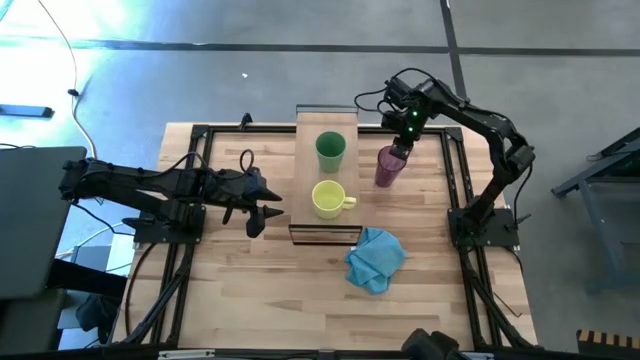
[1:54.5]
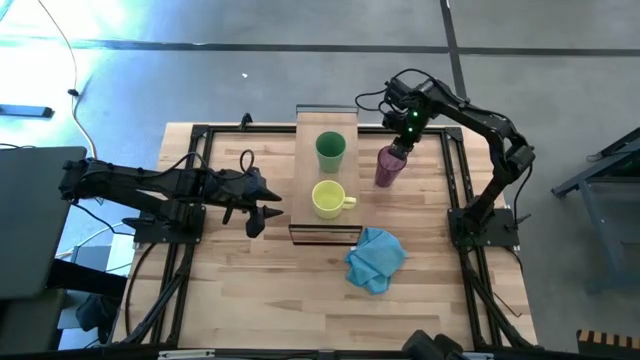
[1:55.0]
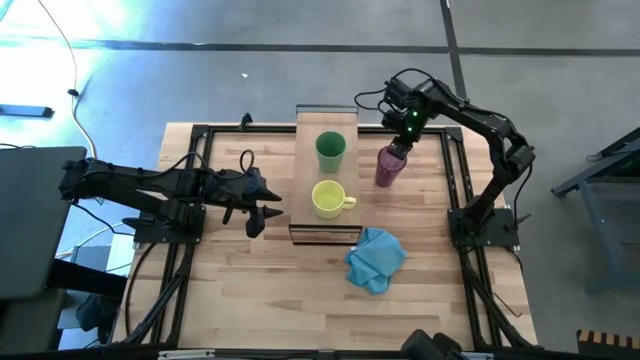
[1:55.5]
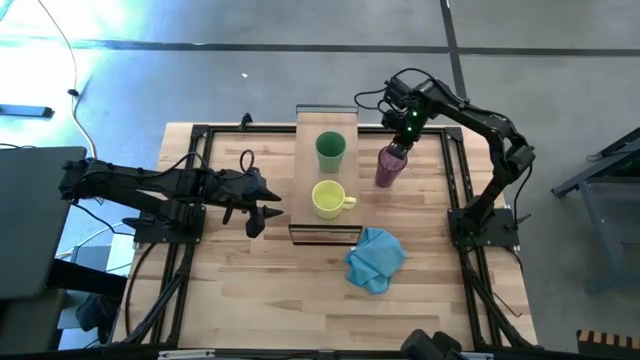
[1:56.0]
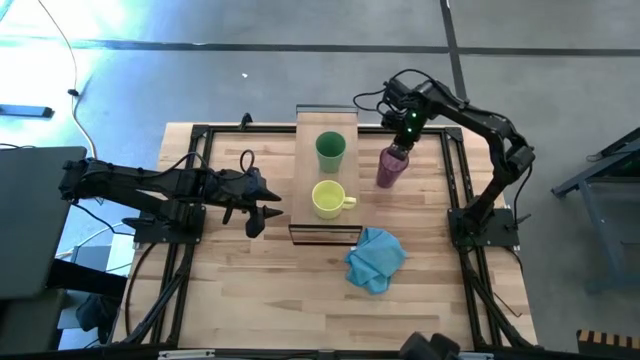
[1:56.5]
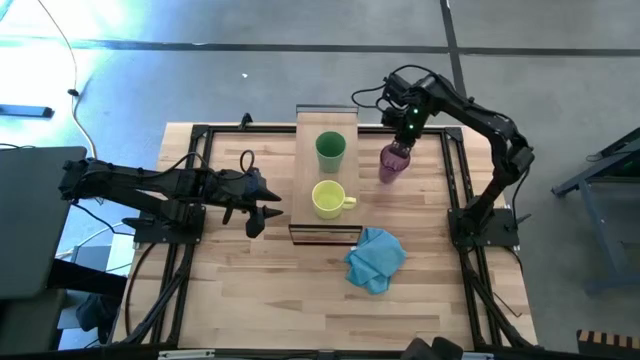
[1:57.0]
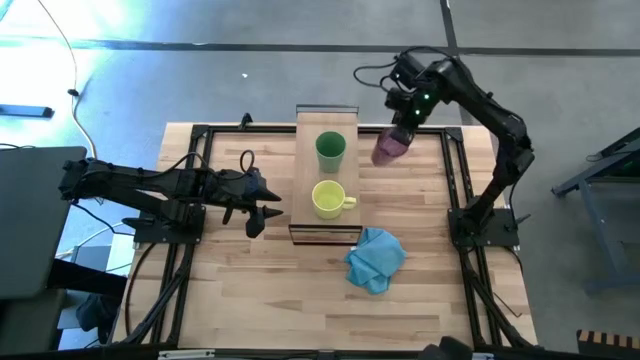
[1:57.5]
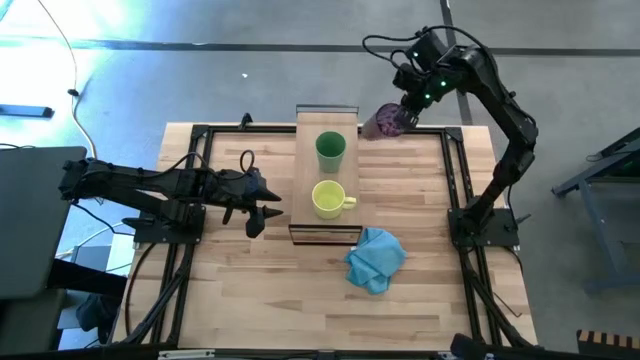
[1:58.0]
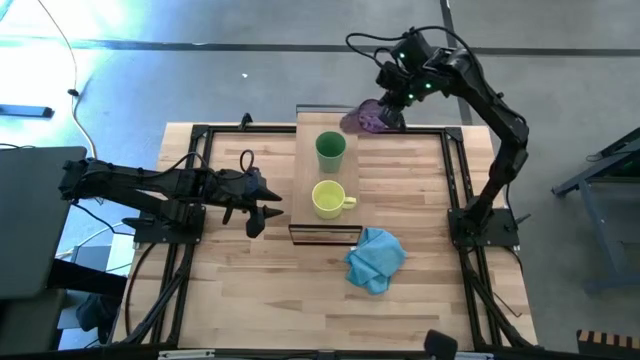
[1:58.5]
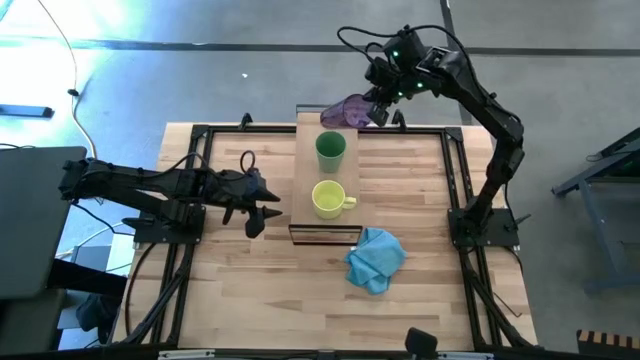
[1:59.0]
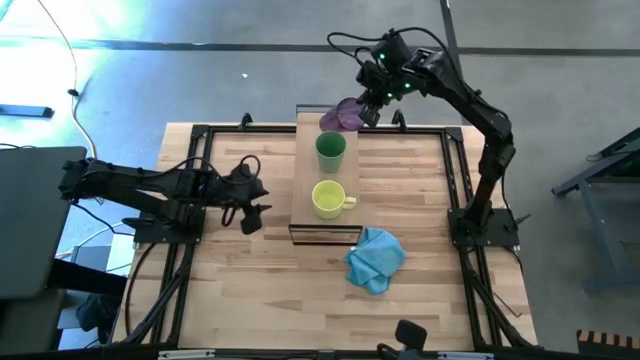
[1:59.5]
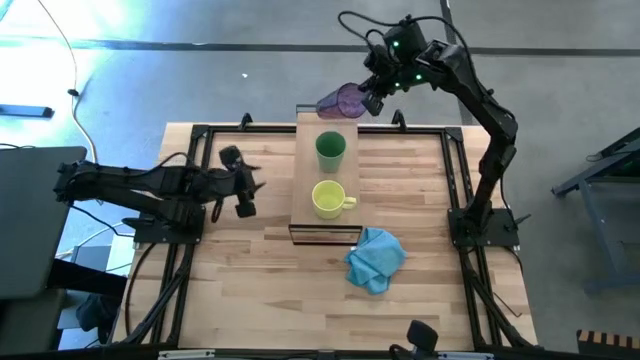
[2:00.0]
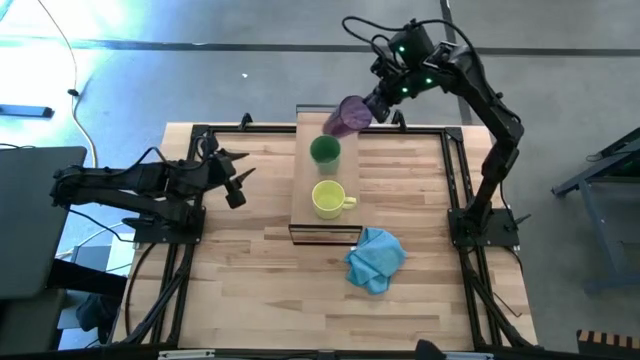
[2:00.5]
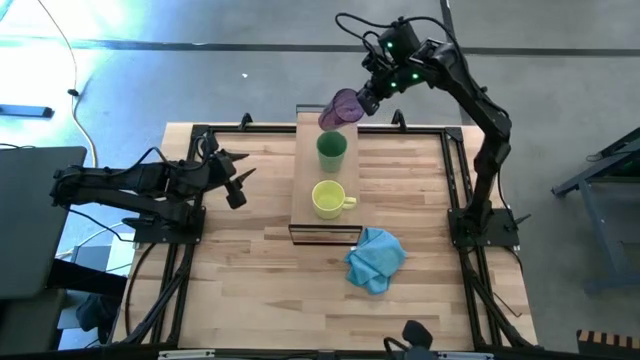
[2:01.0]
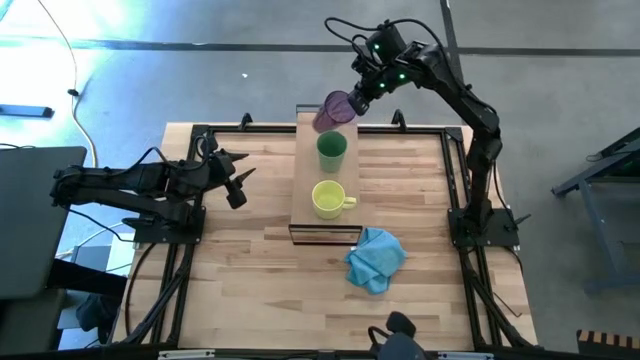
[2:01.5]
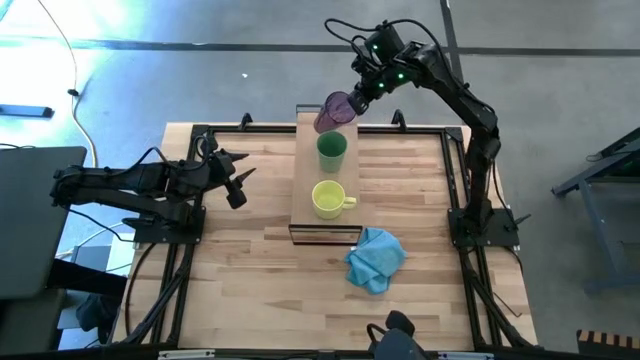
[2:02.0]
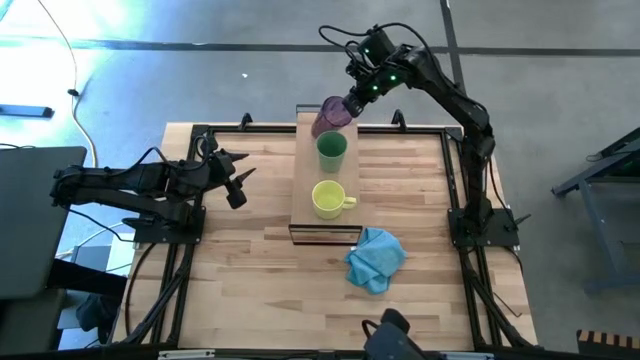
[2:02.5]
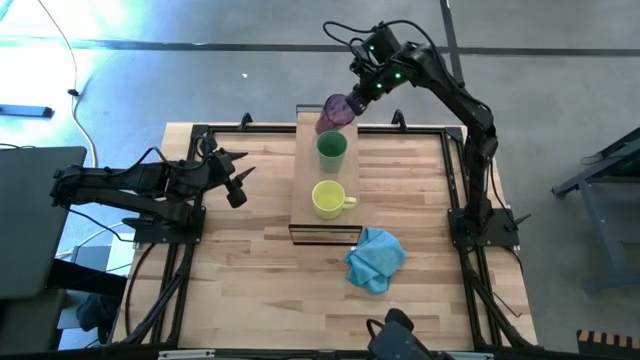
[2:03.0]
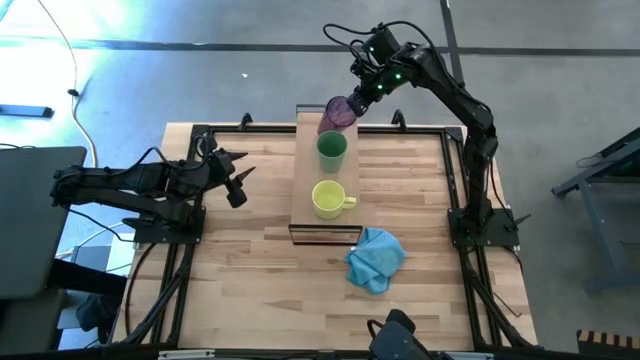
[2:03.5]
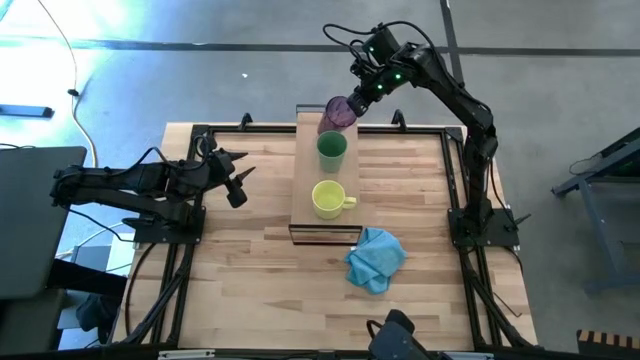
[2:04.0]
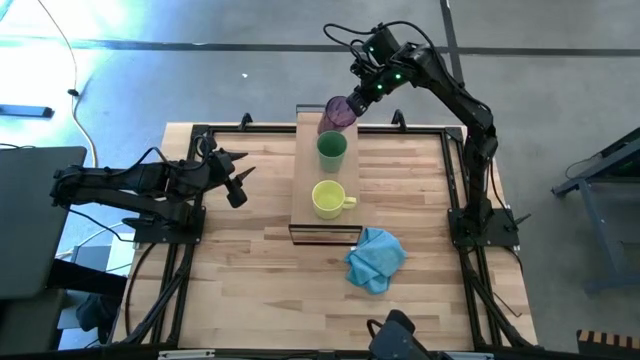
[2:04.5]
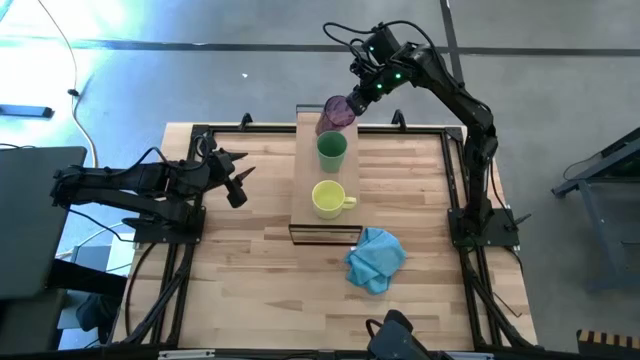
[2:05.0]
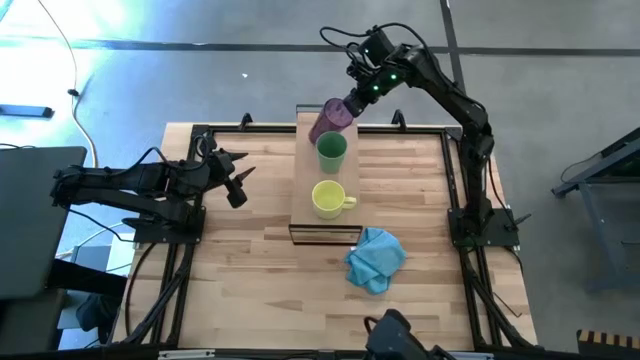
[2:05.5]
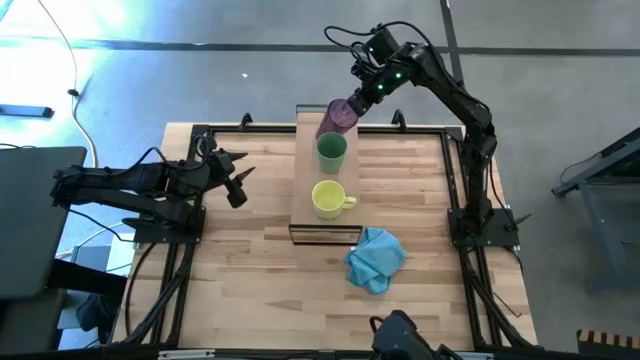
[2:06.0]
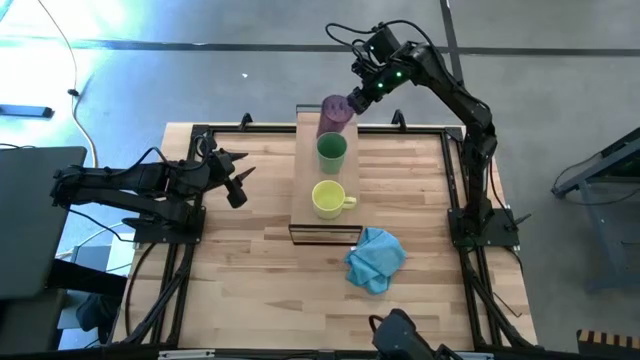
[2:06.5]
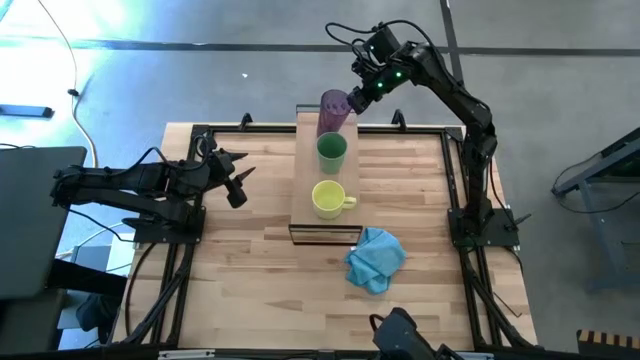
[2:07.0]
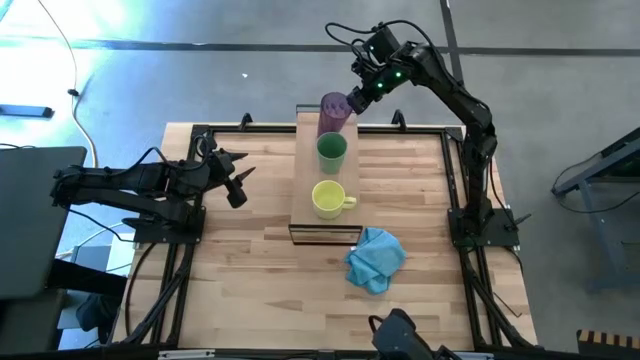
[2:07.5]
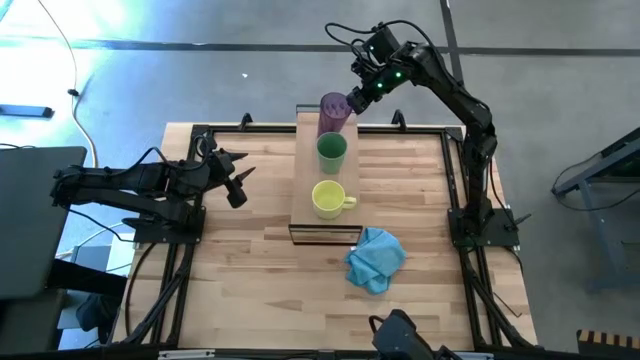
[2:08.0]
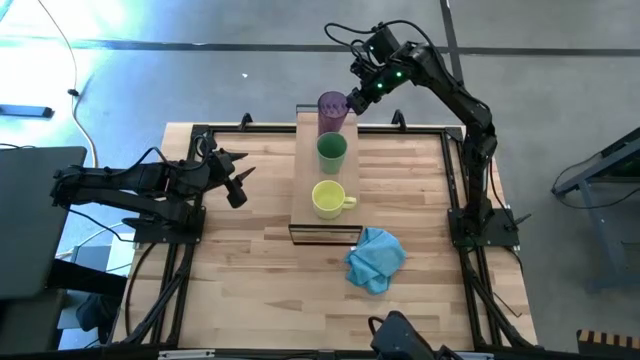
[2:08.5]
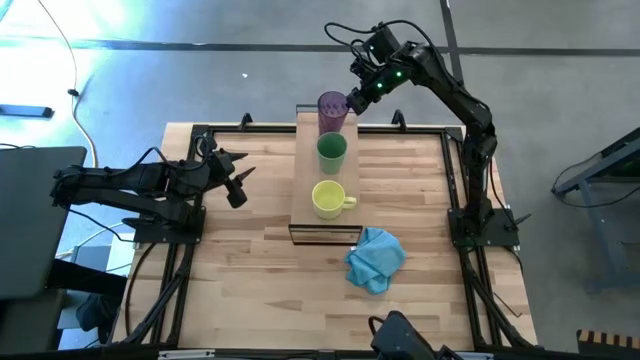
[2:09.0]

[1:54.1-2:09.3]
Task: Stack small to large cups/mugs on shelf
Put the violet cup on the shelf

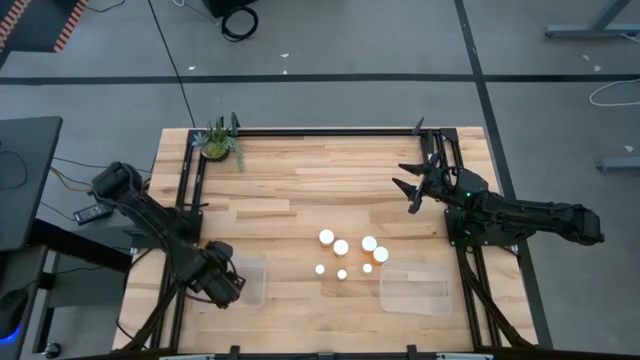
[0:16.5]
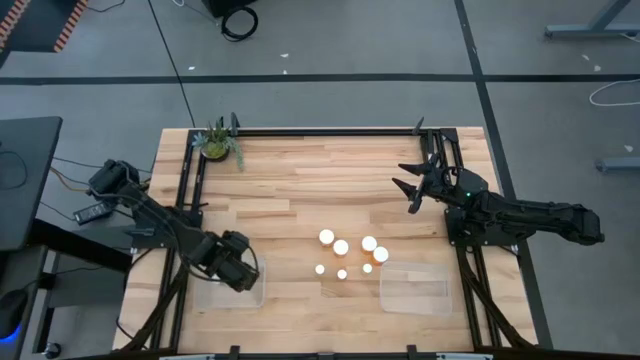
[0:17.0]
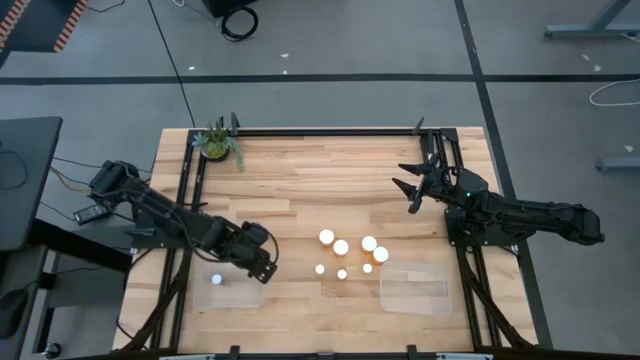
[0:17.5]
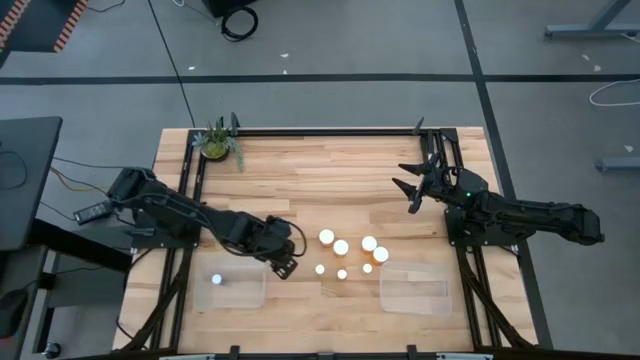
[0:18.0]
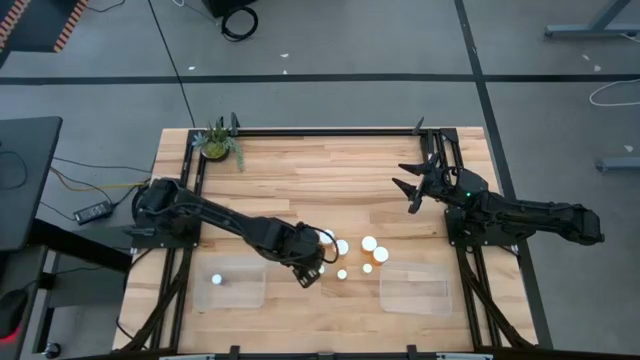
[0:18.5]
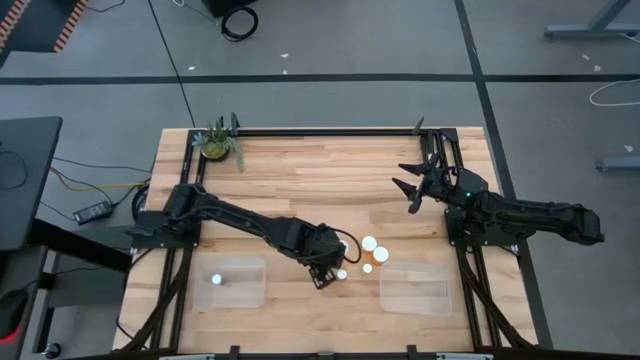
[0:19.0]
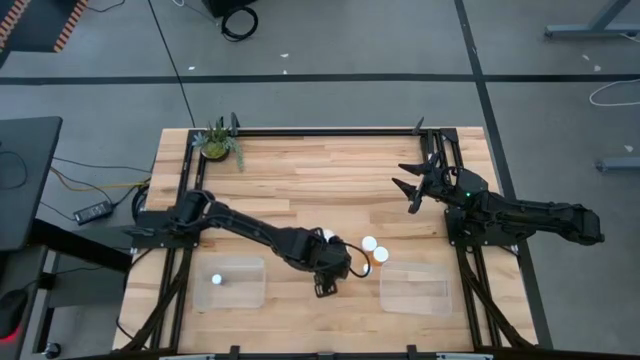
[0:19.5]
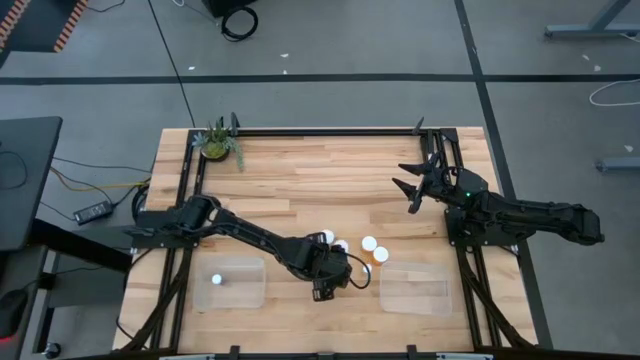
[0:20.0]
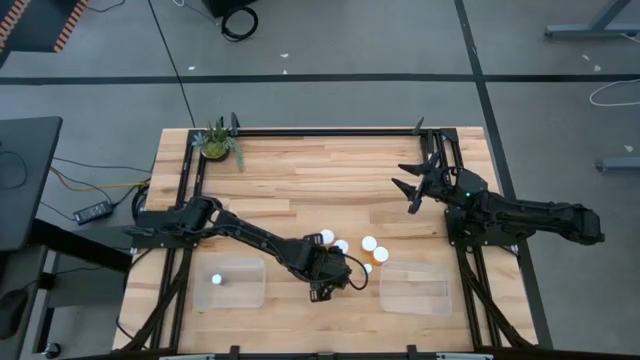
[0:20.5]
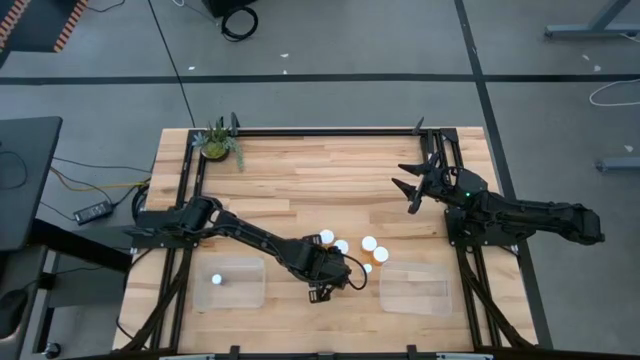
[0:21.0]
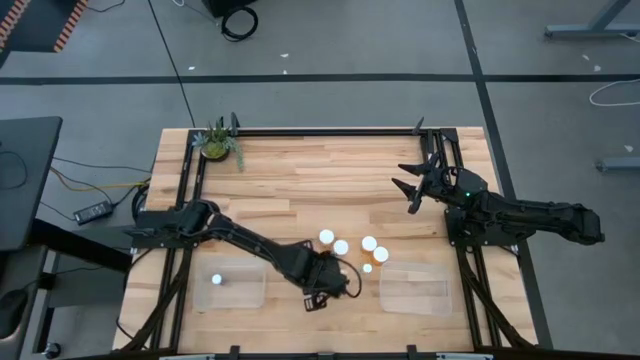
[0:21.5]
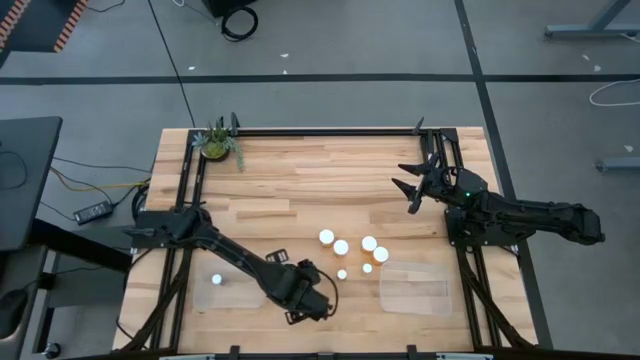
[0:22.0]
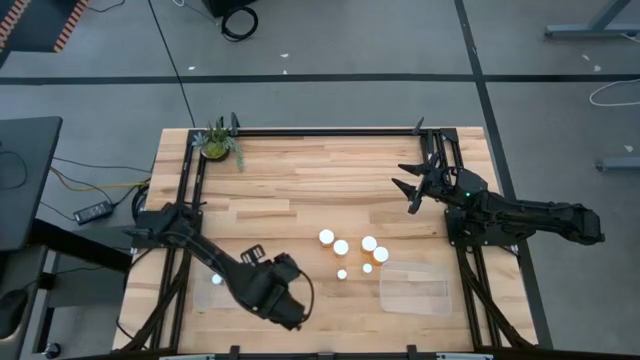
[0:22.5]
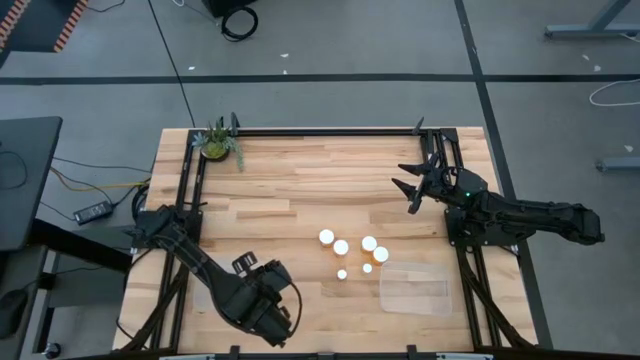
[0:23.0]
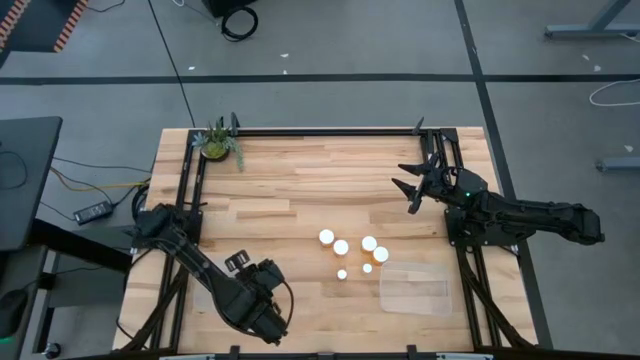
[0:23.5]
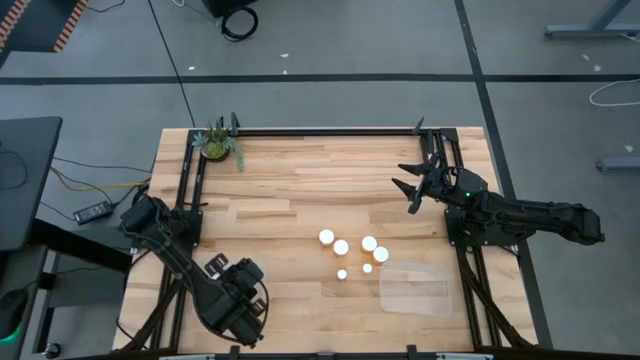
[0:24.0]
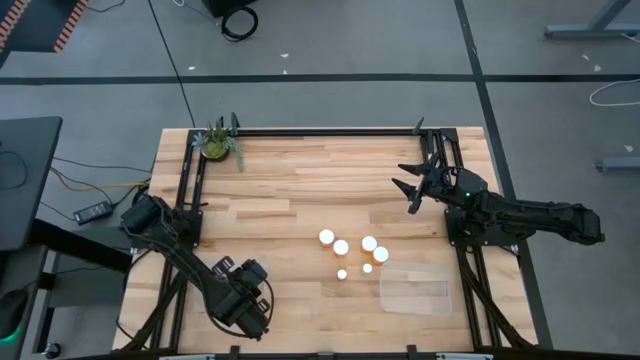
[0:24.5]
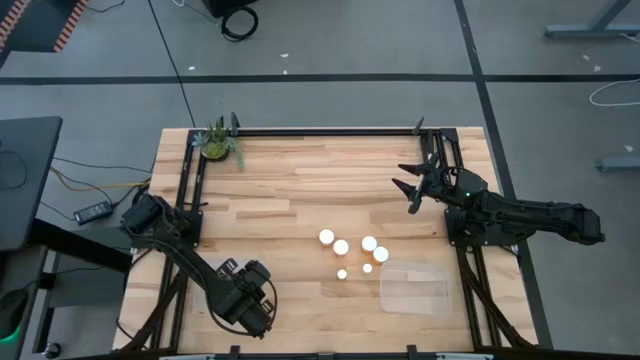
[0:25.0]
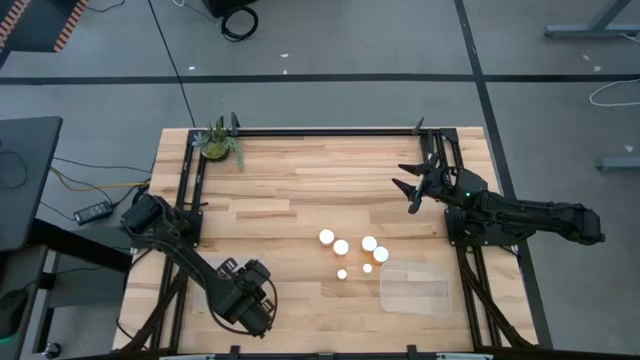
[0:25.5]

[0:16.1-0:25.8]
Task: Pick and place medicine bottles into bin by pill shape (circle, oval)
Put the left small yellow pill bottle into the left transparent bin
